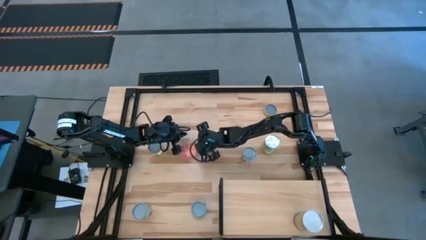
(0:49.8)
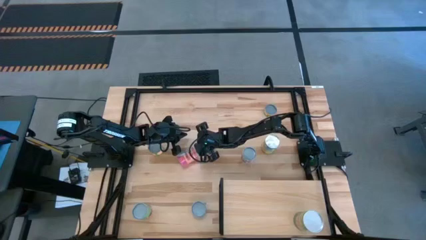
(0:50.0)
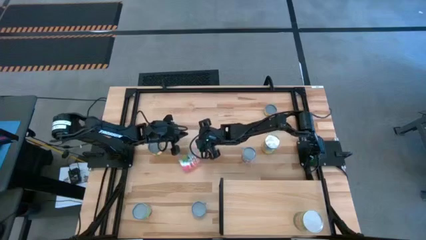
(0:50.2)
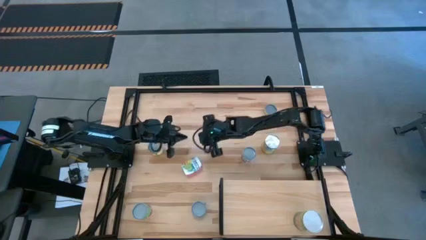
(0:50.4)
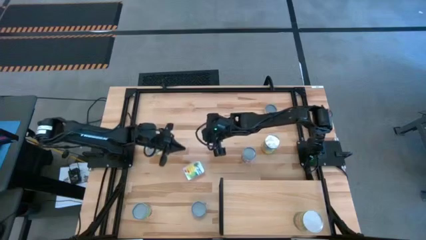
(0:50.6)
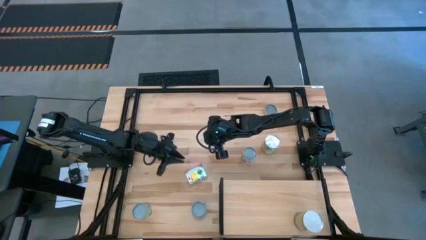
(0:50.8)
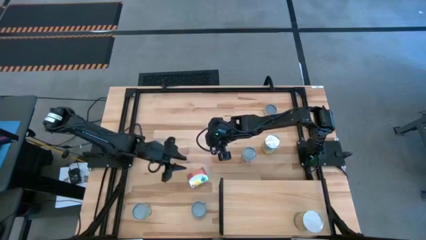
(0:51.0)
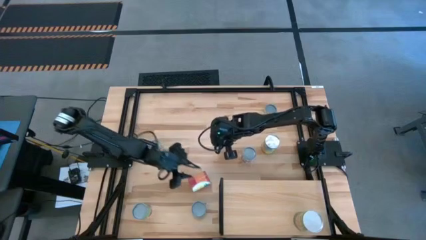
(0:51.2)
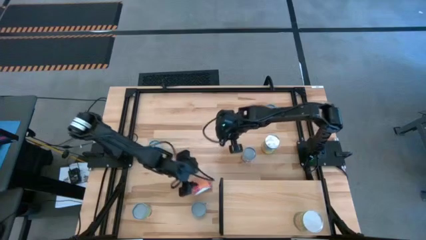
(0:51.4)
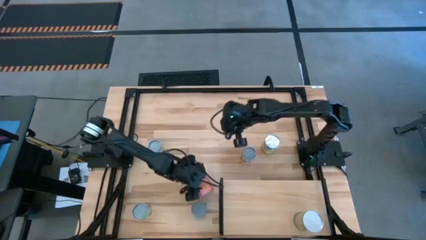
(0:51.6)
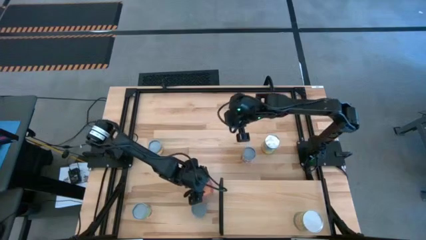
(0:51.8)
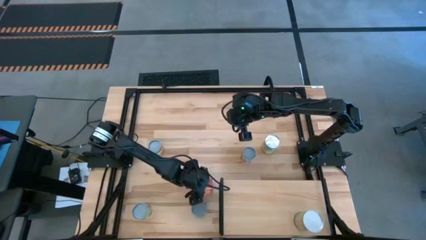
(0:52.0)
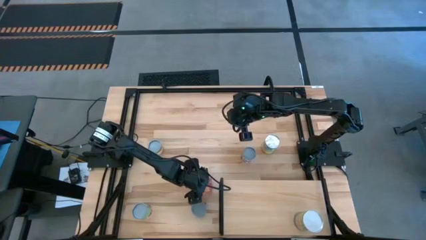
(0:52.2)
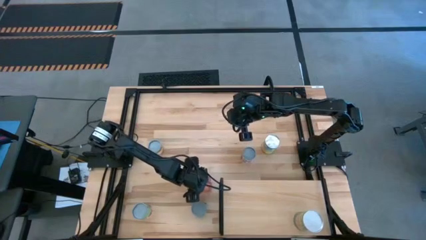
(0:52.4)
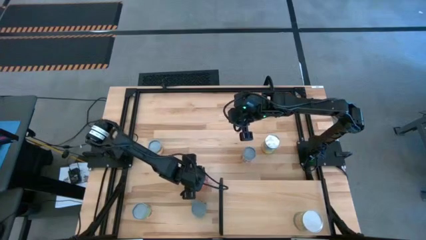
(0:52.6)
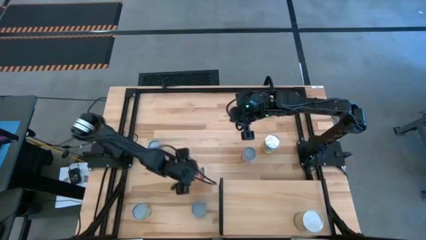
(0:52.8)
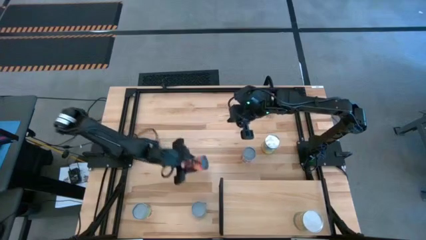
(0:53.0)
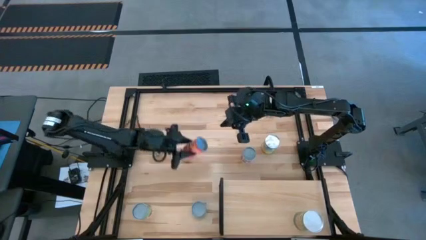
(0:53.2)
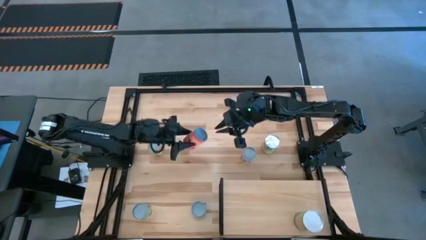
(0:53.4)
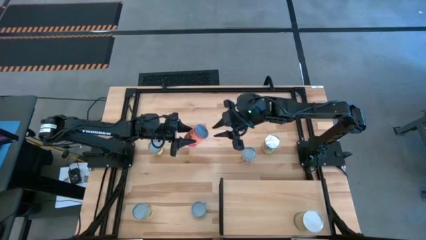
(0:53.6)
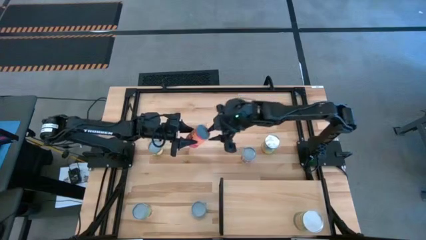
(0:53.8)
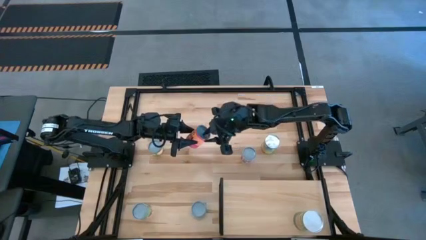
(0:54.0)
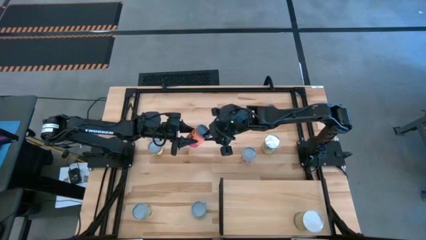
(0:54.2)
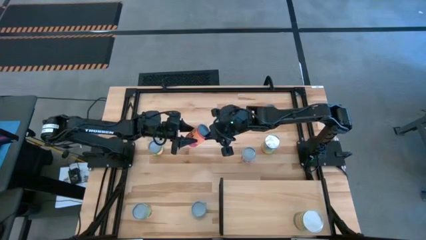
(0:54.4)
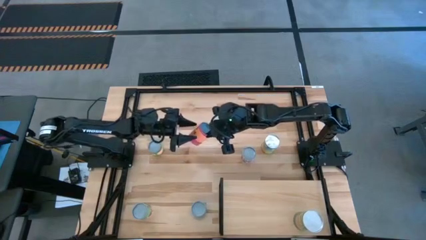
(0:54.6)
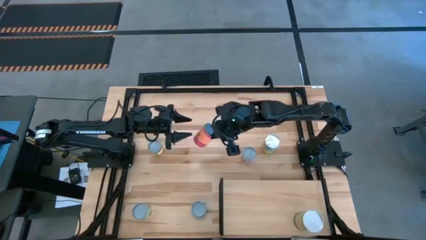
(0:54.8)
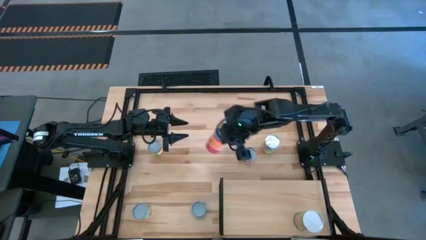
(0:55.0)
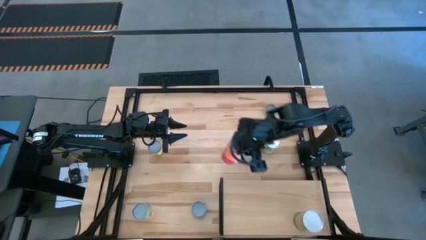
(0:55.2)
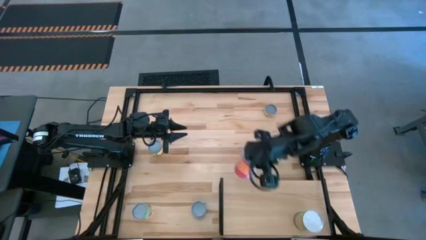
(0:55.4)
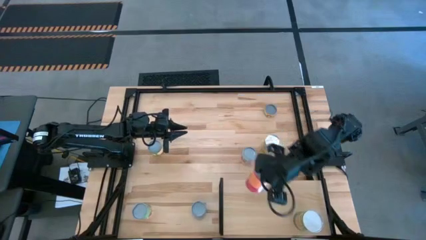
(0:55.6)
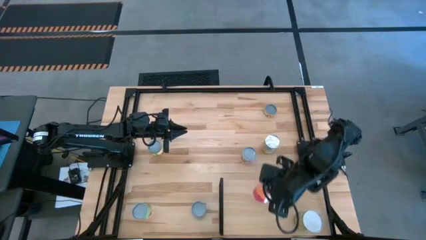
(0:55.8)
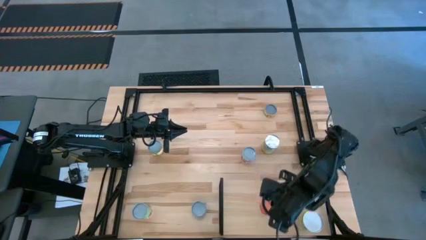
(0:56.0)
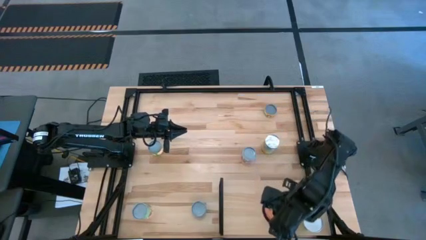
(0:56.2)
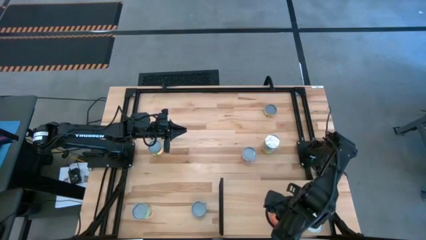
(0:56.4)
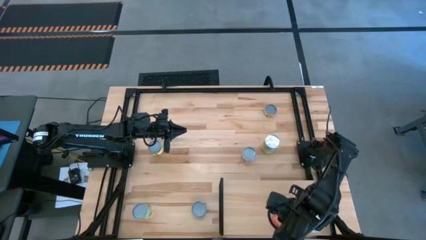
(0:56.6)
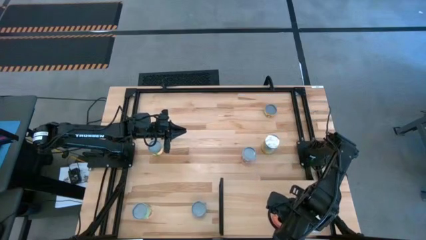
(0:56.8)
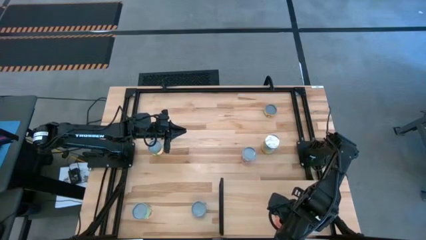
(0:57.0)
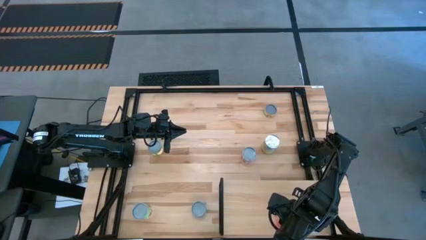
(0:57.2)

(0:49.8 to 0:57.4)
Task: Pick and place cans onto a shelf
Put the canned mixed fruit on the shelf

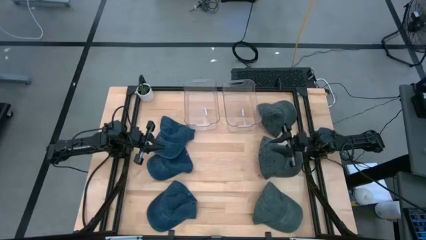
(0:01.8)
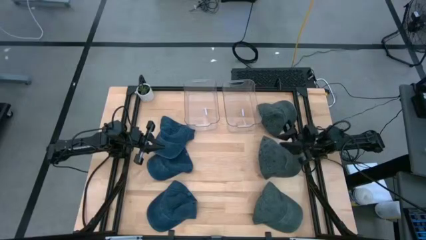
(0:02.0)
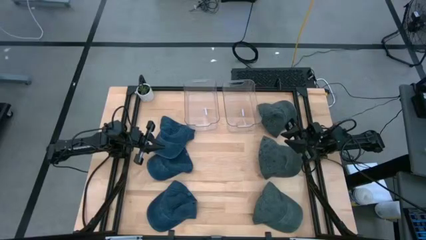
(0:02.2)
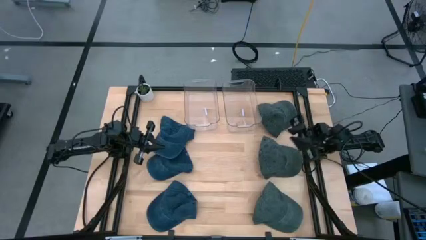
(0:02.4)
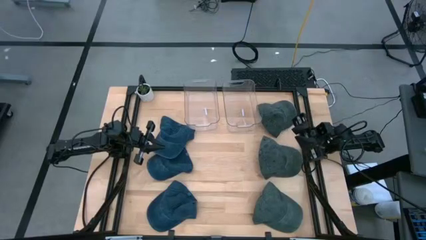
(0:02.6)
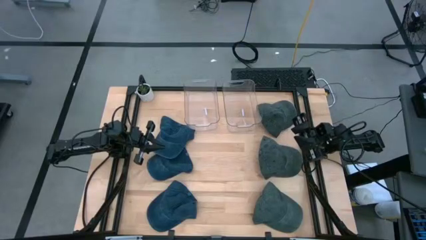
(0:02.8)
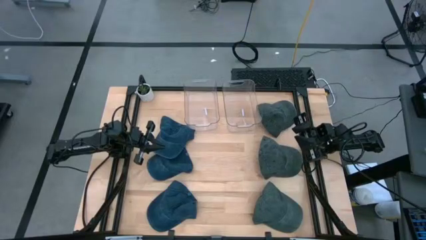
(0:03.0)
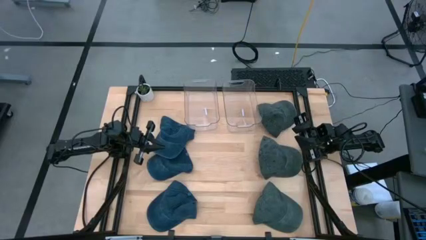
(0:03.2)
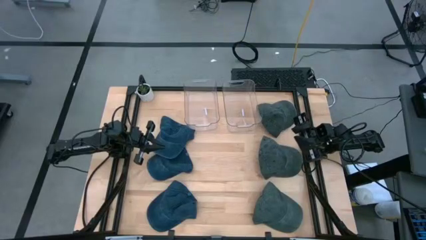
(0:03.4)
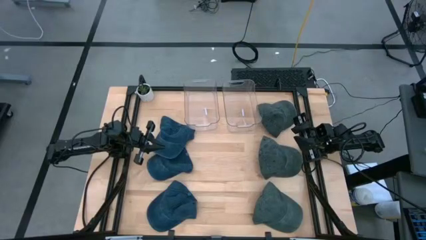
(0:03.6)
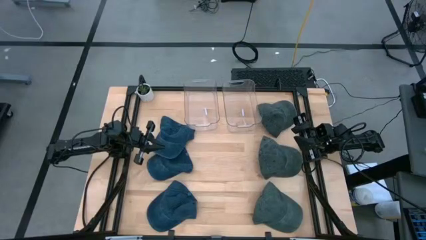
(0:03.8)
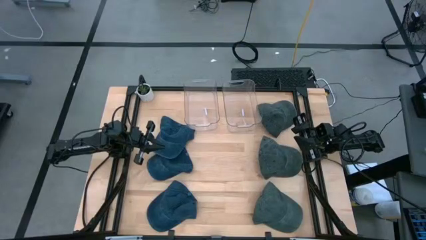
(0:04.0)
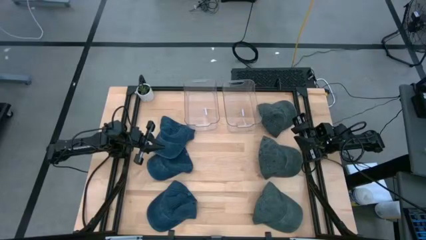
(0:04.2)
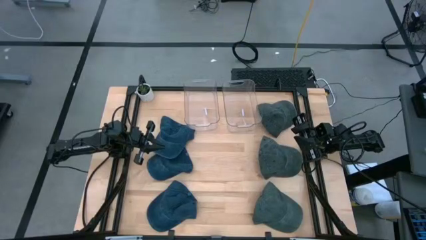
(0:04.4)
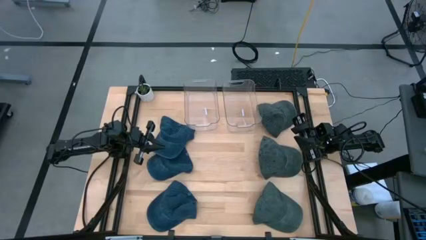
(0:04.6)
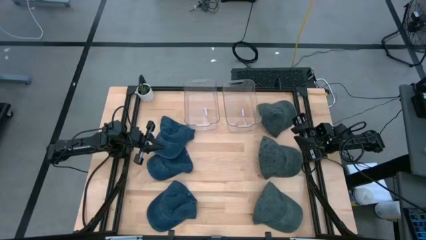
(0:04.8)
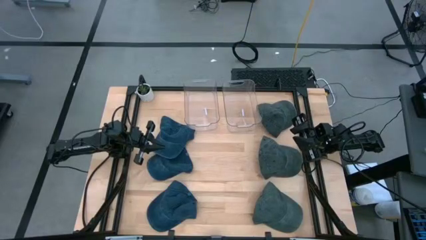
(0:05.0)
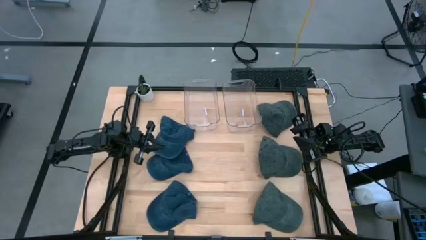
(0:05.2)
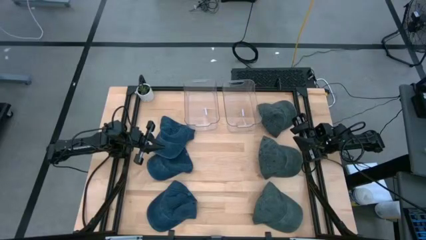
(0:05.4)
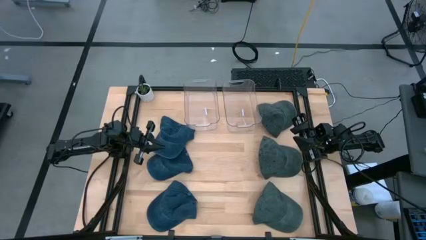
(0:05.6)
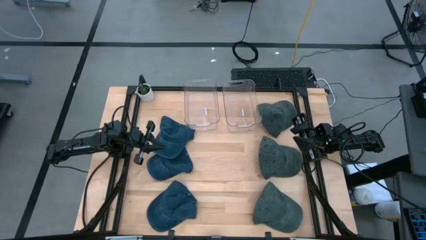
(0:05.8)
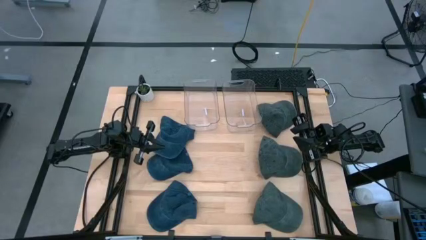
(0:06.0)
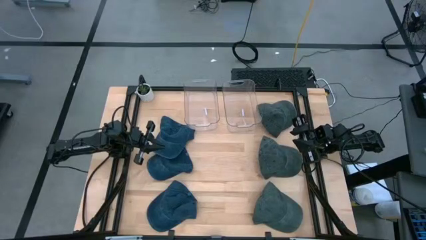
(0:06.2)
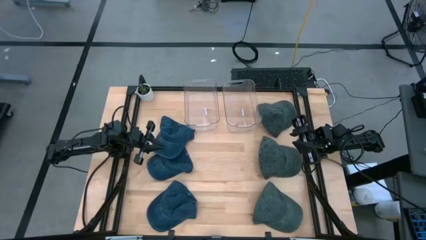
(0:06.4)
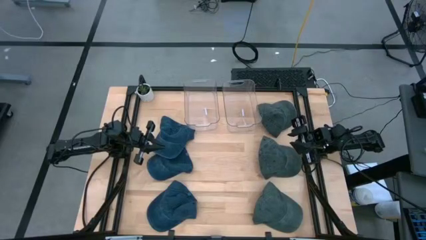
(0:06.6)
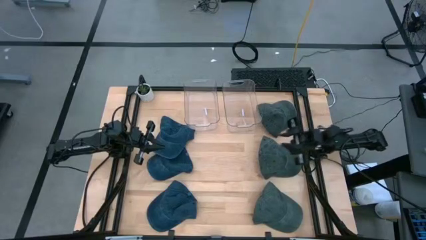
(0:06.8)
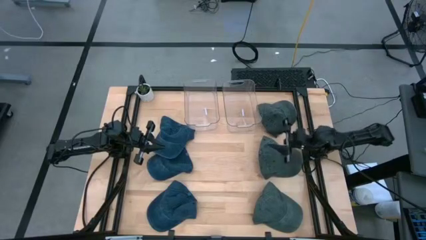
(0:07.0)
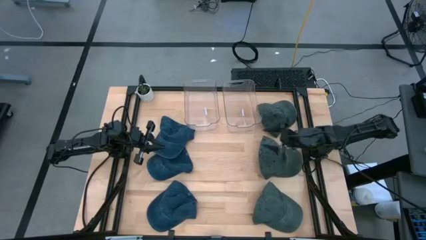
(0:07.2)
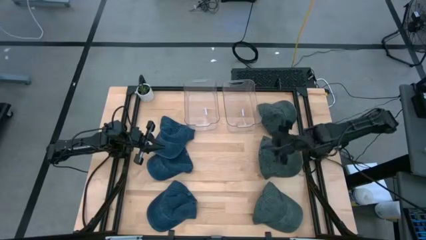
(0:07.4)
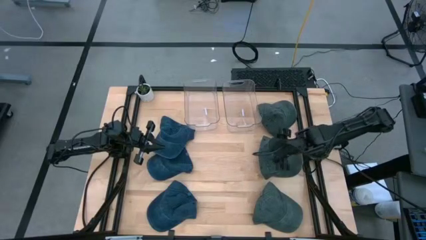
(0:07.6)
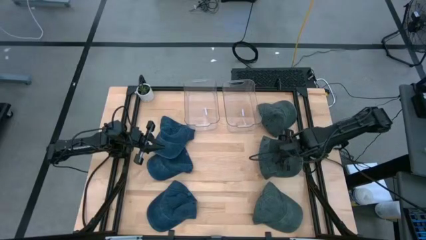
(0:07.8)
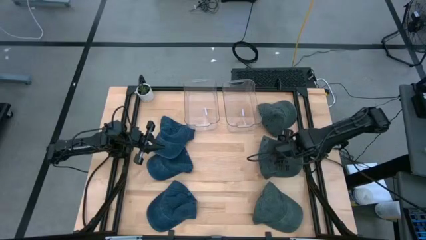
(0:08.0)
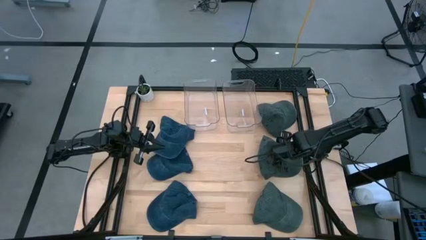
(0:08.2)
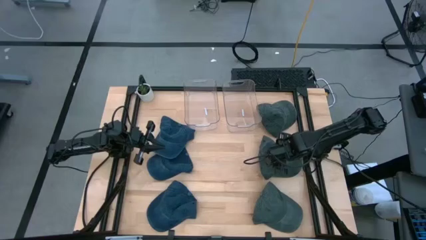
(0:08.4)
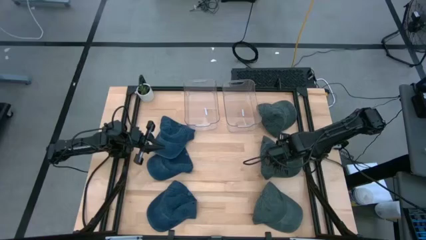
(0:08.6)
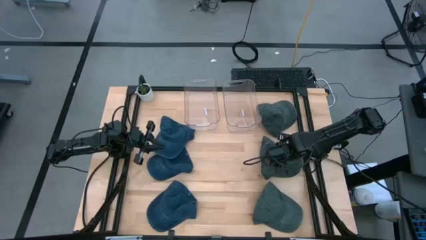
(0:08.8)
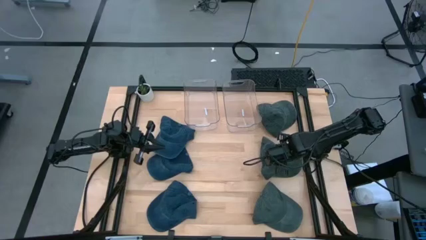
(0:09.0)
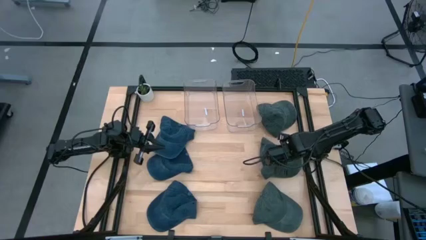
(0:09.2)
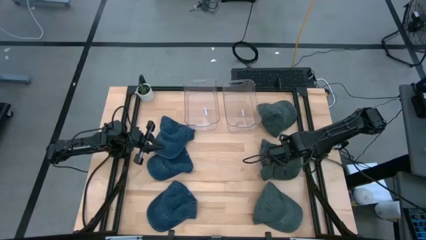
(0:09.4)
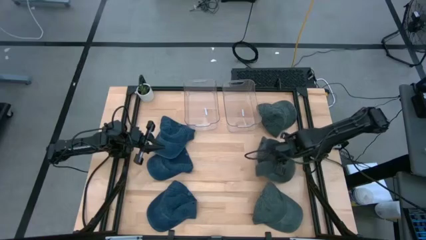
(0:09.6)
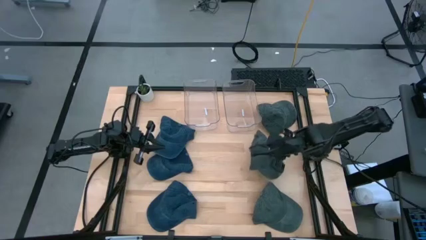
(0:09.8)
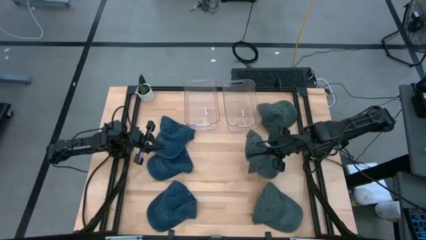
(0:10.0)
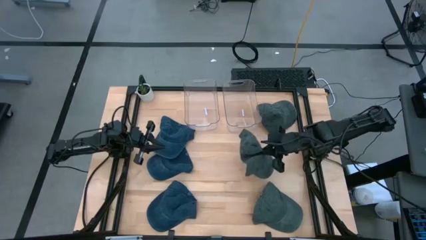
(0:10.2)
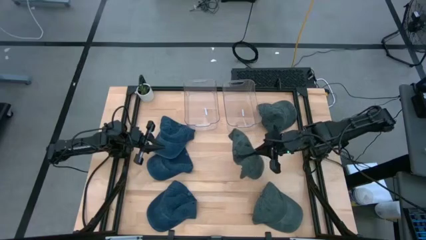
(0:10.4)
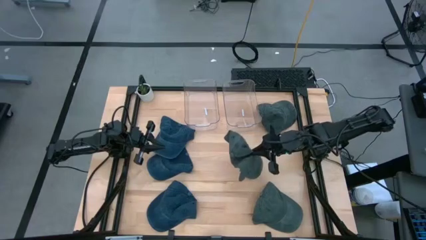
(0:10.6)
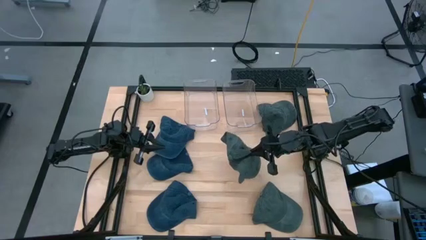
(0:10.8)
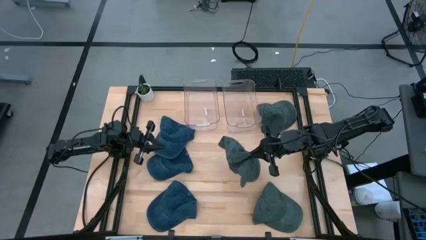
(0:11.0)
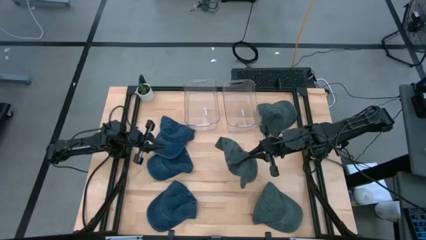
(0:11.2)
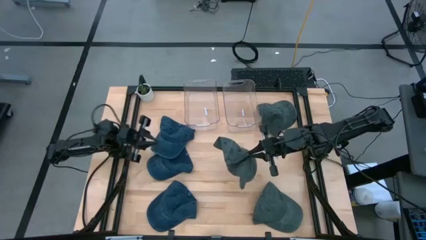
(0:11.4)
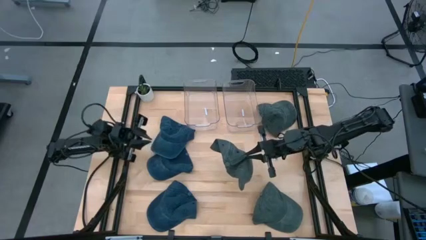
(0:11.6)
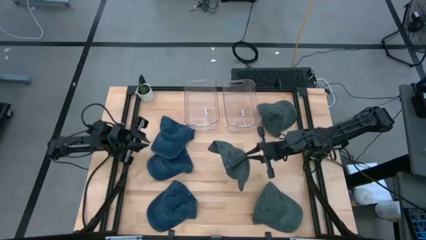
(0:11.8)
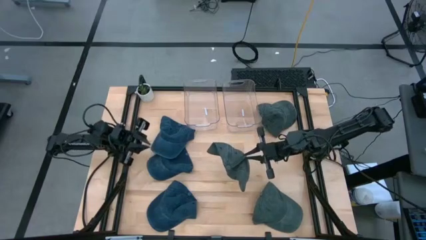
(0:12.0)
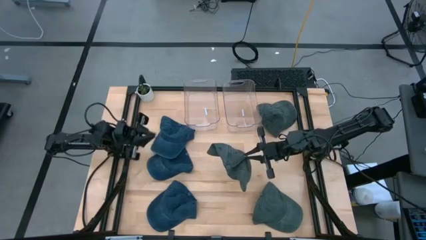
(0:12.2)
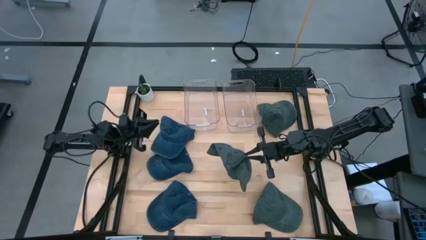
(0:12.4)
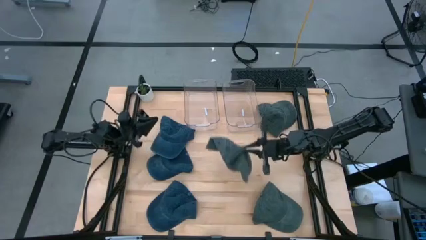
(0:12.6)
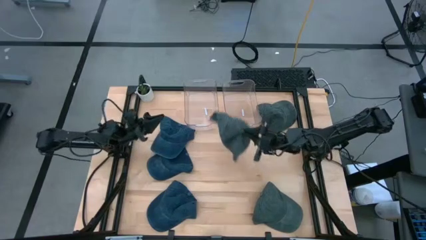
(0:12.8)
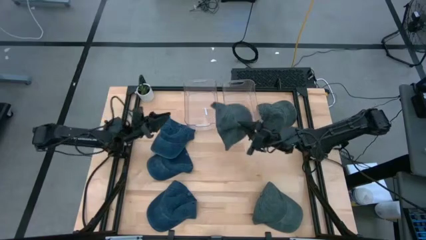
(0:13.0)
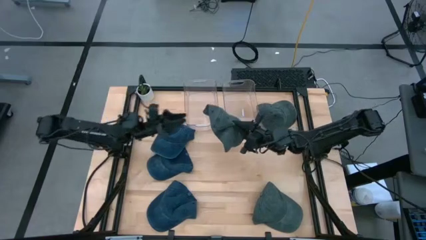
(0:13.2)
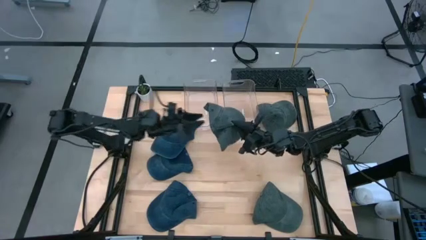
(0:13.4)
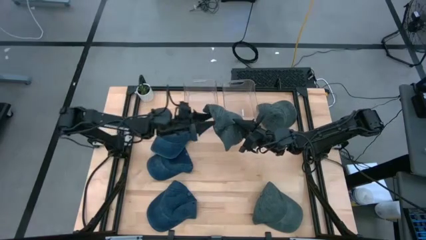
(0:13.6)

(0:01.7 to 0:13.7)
Task: Pick & Place hat
Put the middle gray cap into the left transparent bin
